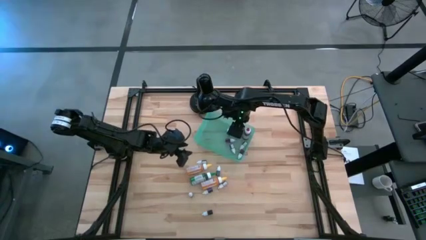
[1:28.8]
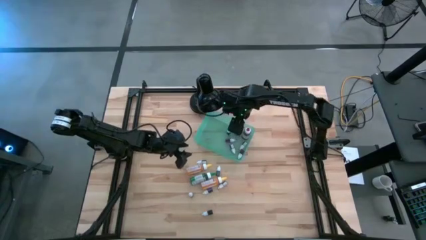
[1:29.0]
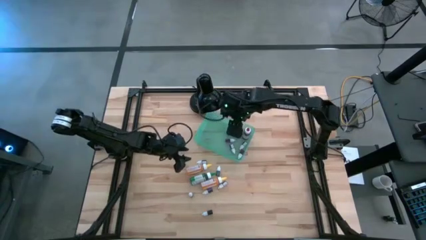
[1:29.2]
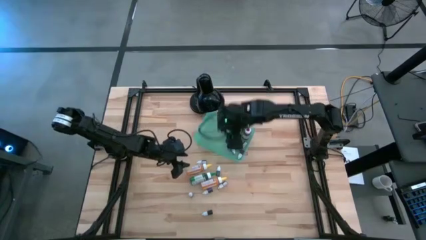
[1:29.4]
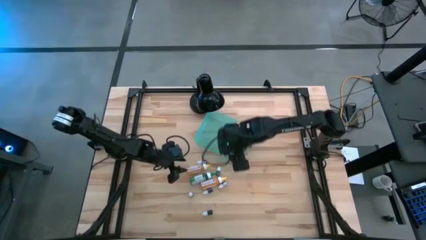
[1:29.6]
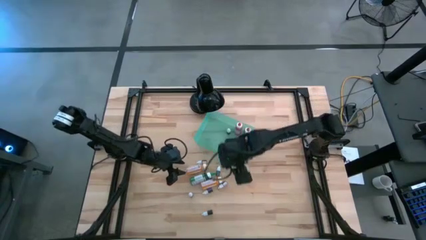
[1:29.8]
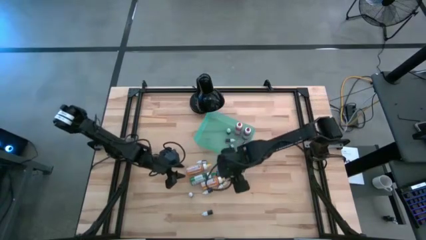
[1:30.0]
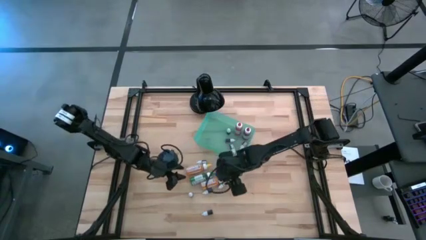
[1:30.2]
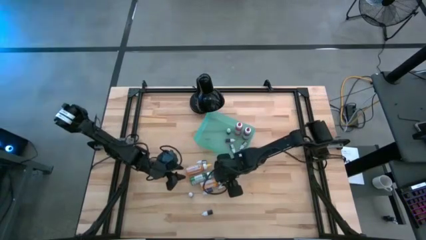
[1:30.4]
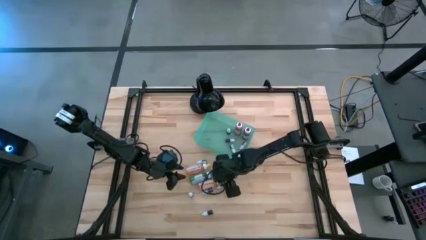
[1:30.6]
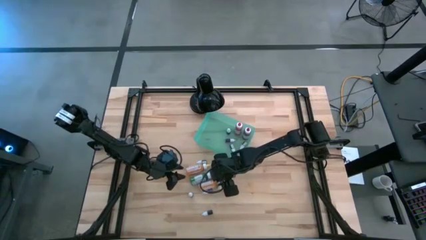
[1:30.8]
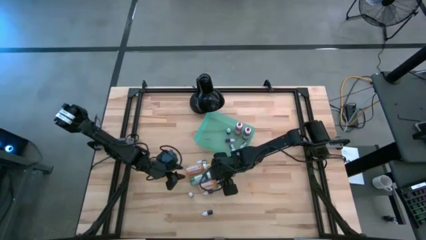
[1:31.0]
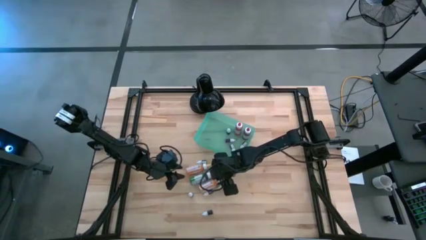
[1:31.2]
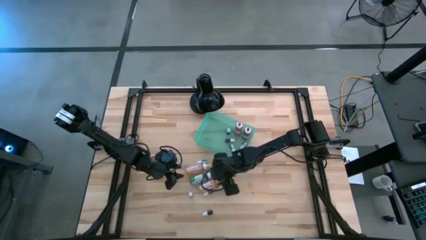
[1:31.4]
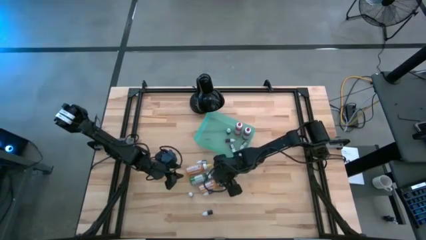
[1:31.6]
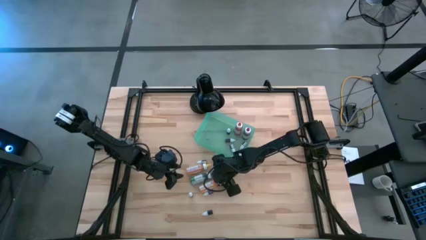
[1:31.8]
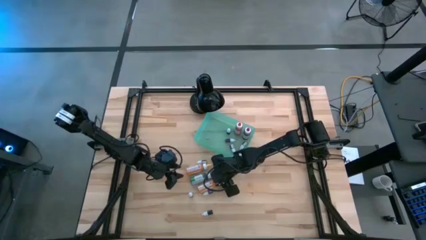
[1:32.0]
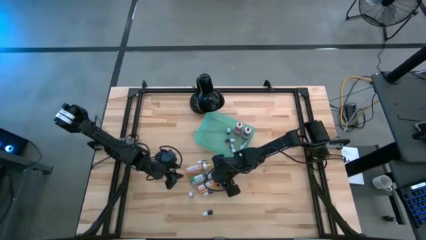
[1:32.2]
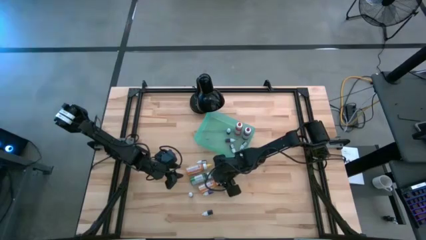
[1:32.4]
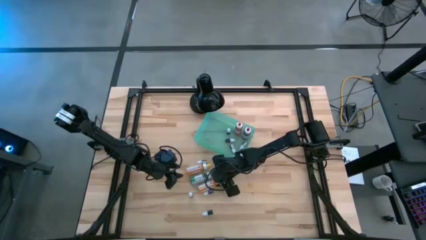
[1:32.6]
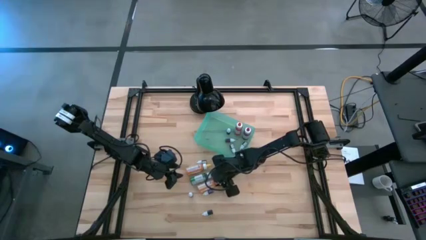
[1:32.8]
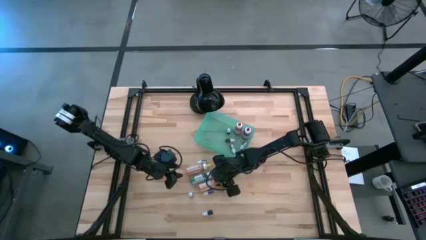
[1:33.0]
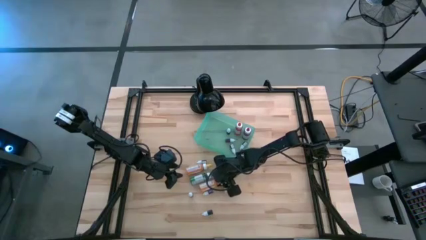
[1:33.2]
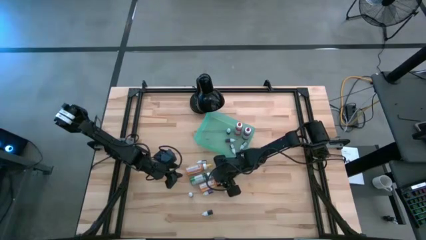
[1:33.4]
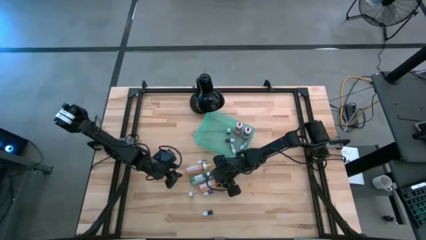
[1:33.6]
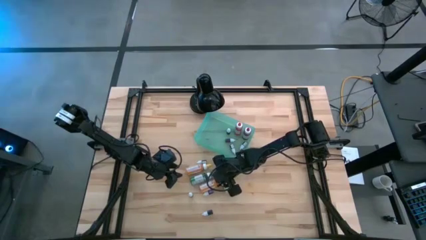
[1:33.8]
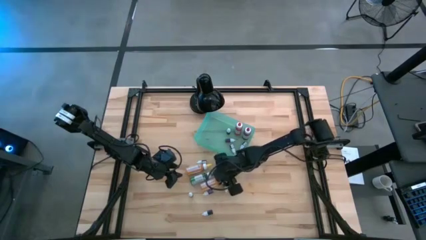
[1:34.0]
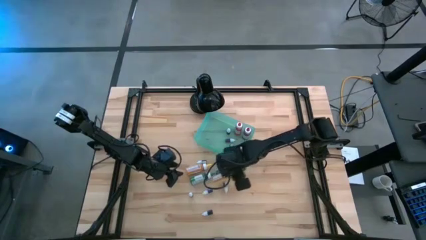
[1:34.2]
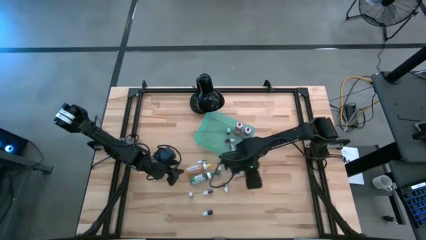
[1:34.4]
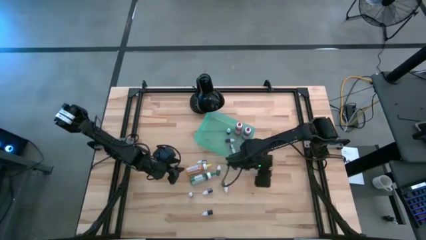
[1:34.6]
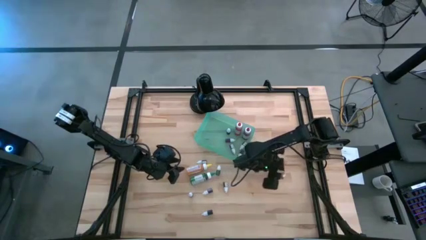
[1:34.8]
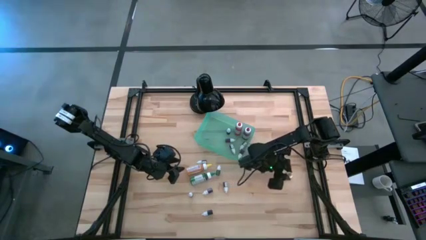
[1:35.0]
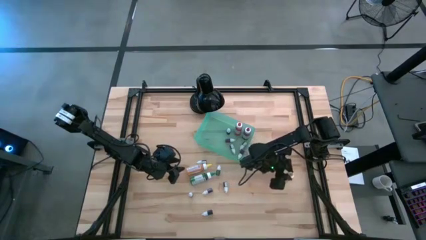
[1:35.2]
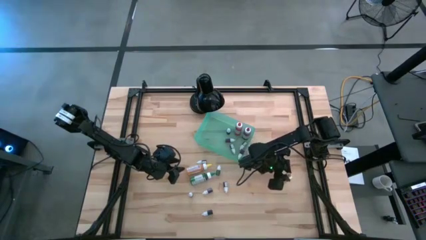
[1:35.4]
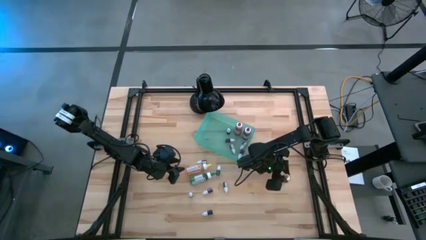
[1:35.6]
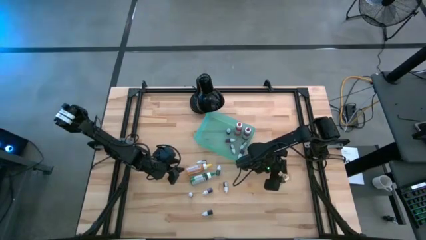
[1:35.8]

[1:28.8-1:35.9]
Task: Pick & Place food coloring
Adjust the large yellow food coloring bottle

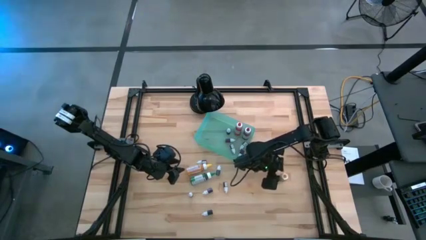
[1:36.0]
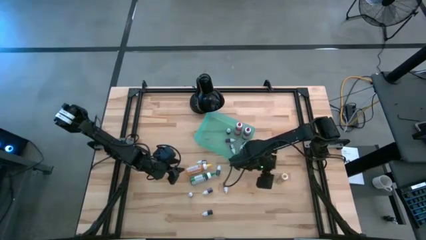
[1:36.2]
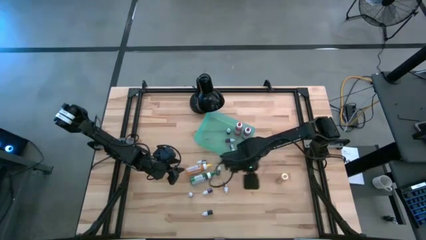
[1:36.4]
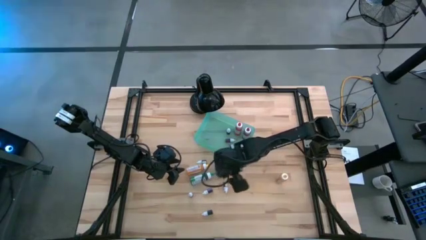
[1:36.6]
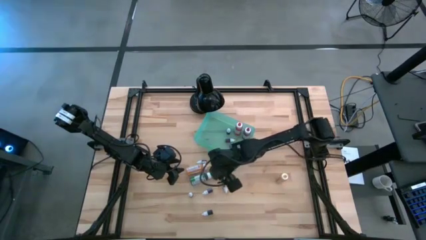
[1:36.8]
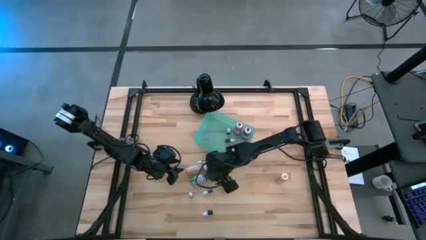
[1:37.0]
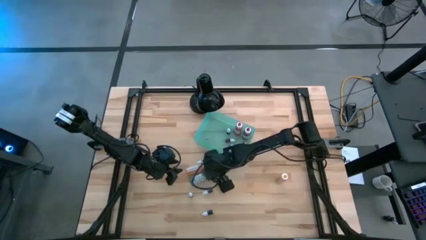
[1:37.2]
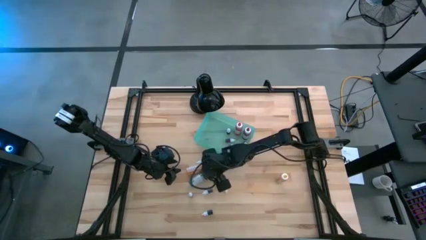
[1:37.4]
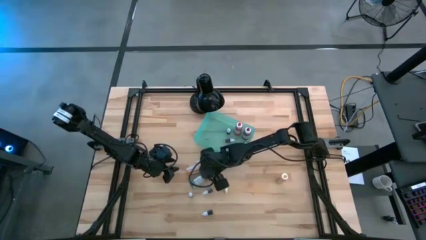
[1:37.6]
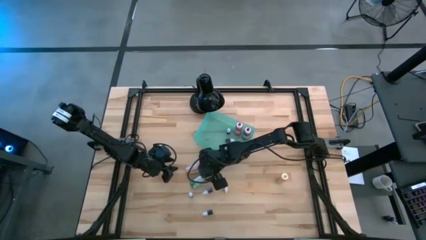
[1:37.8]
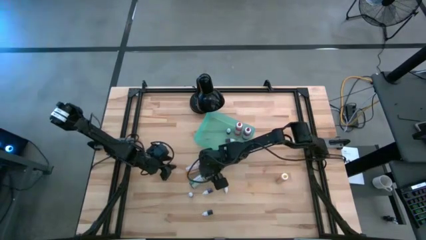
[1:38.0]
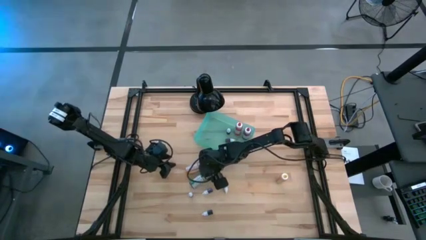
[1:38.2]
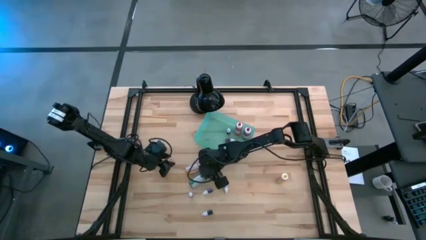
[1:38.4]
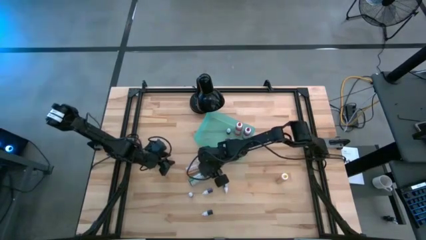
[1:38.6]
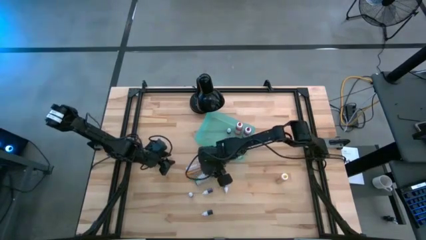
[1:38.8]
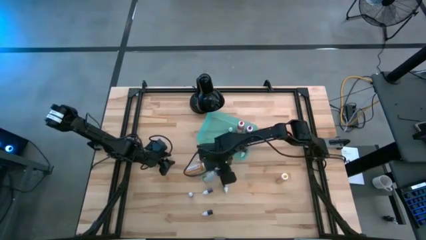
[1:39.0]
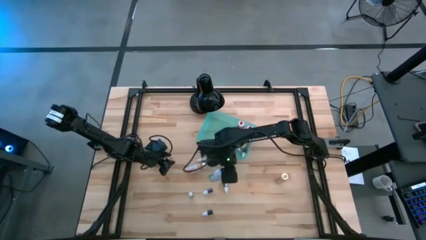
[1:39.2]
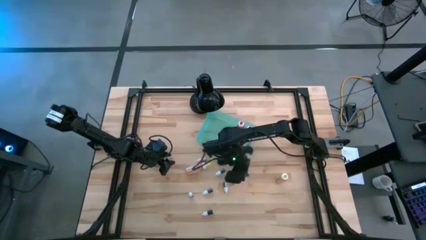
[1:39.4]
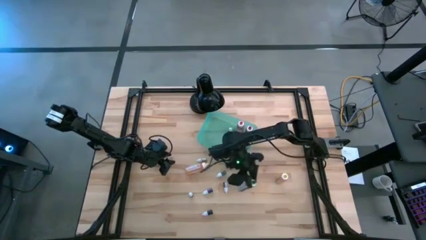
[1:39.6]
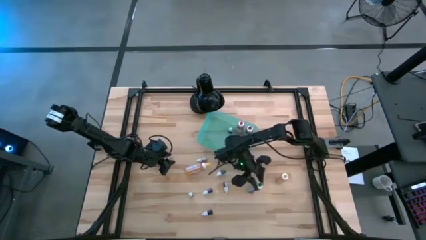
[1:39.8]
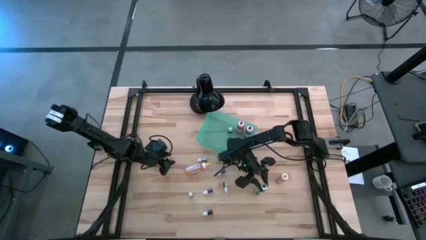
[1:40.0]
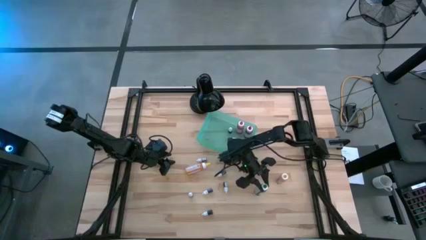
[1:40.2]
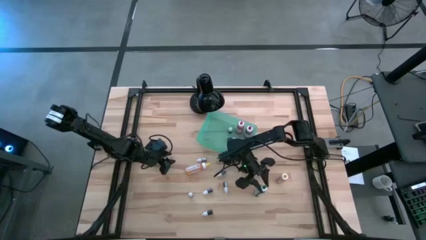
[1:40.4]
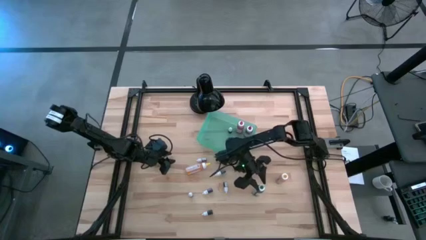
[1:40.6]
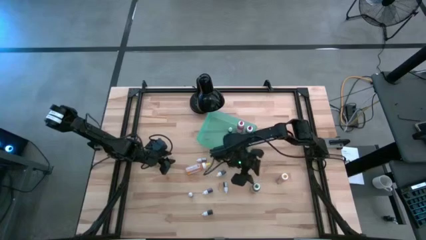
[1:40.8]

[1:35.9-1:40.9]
Adjust the large green food coloring bottle

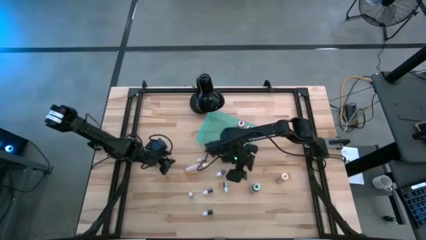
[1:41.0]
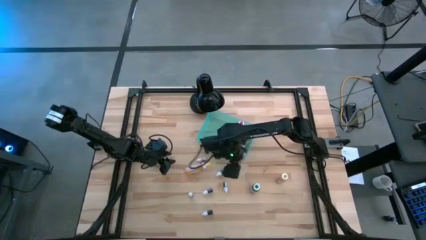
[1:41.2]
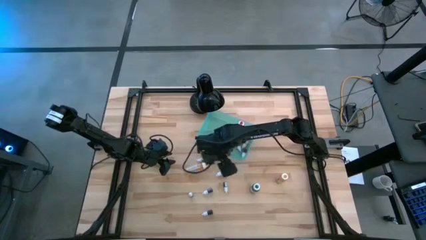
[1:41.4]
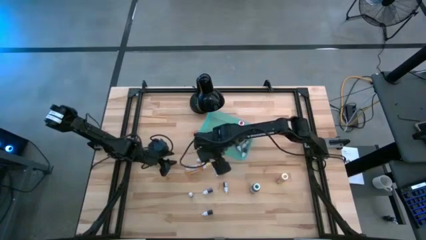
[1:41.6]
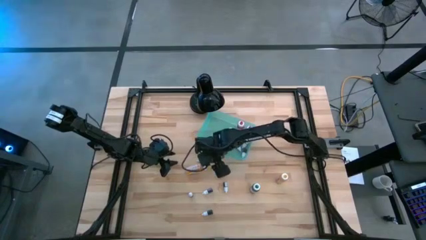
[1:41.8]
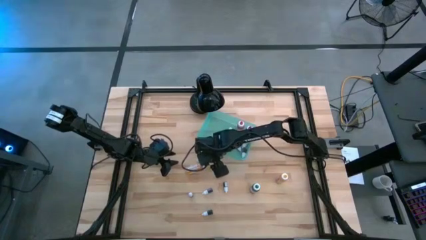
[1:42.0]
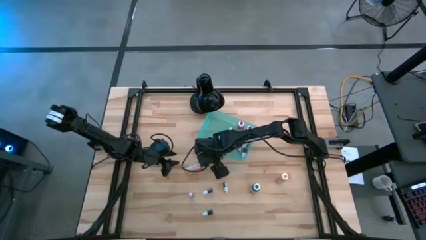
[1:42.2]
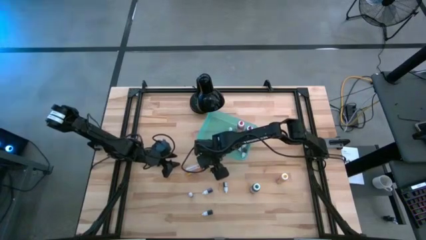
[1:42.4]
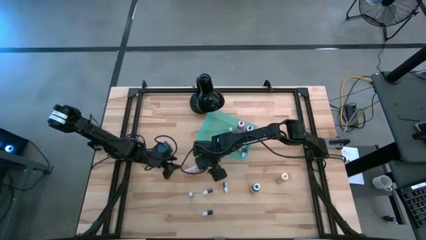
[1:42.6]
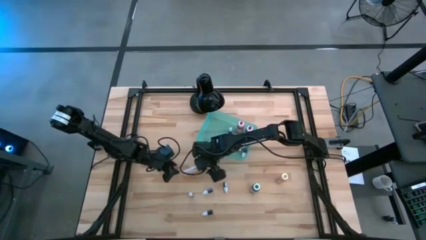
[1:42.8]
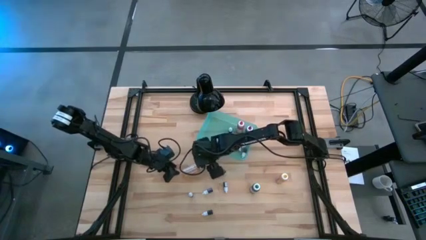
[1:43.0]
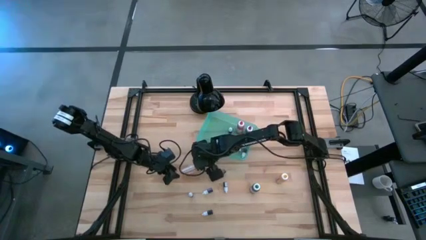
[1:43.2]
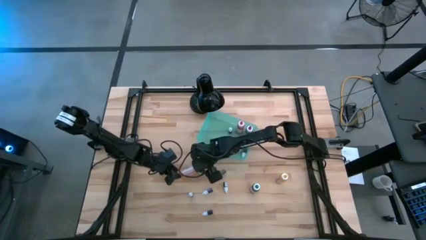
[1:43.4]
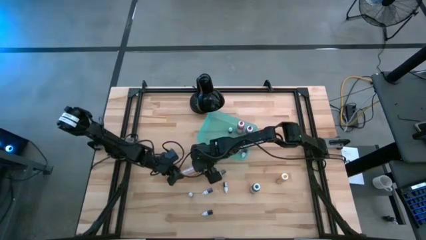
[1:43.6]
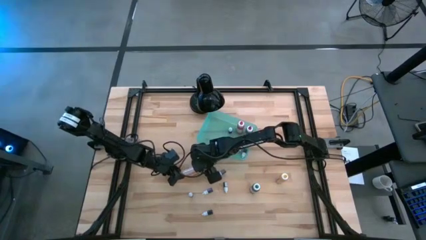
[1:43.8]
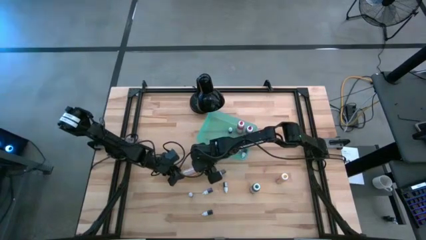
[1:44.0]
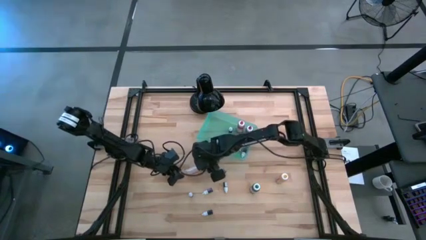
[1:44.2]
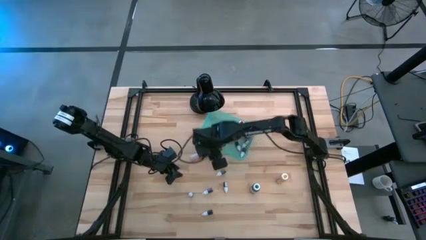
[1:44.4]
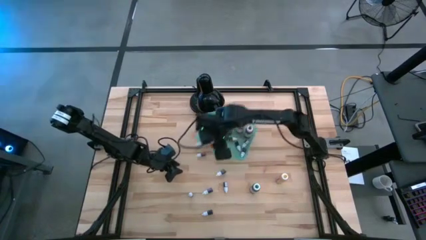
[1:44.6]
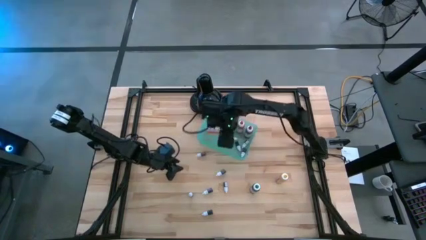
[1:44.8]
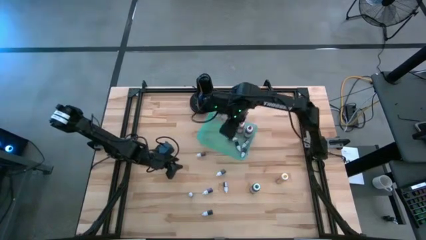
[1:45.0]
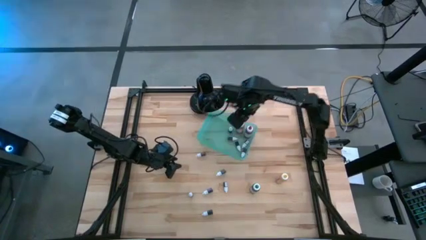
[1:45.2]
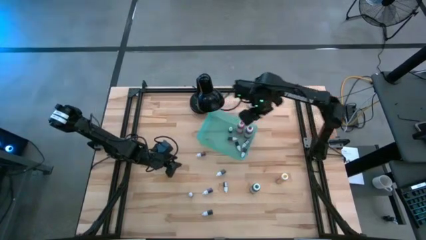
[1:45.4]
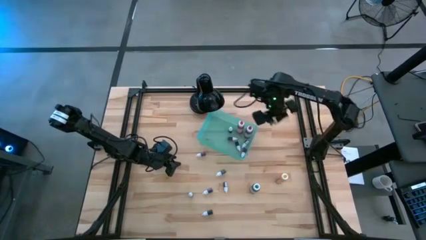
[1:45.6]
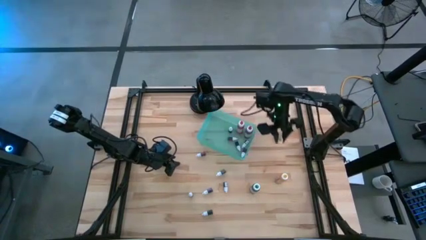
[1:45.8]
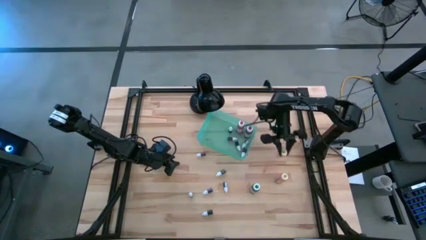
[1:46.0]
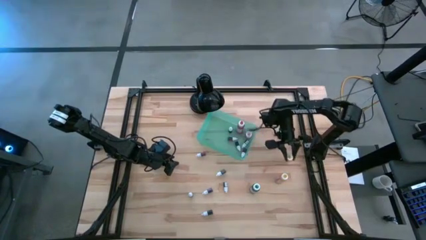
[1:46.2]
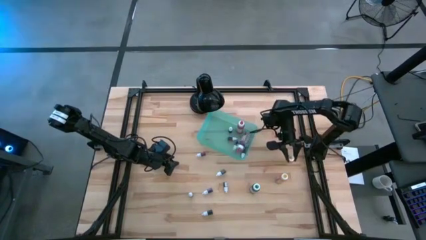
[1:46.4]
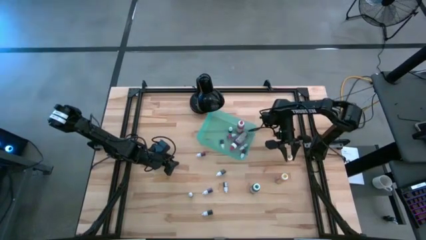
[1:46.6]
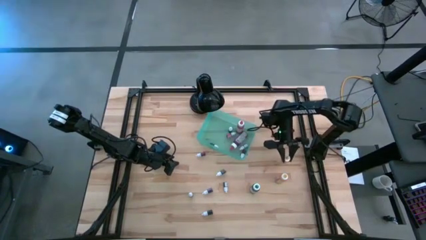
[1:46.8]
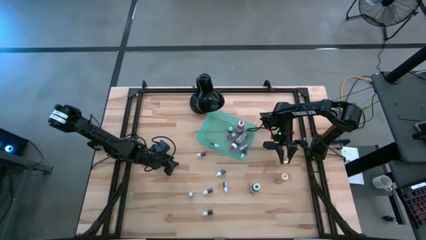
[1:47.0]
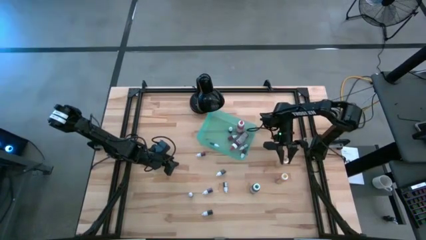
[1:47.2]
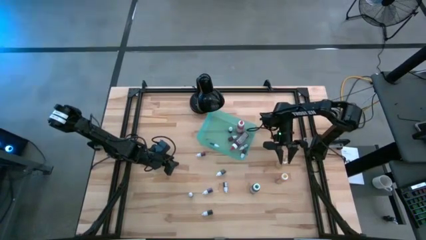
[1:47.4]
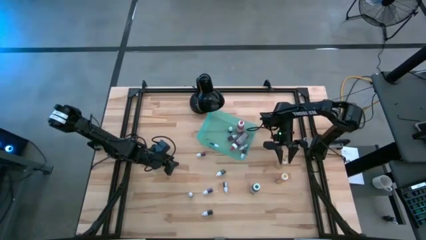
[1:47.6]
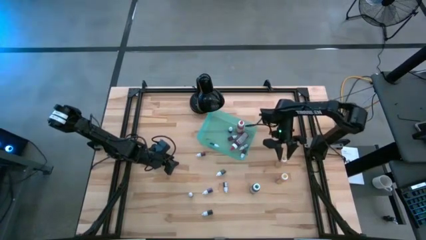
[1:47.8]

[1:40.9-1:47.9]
Adjust the large yellow food coloring bottle
